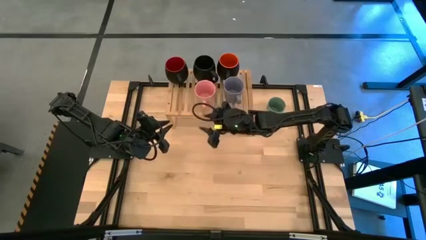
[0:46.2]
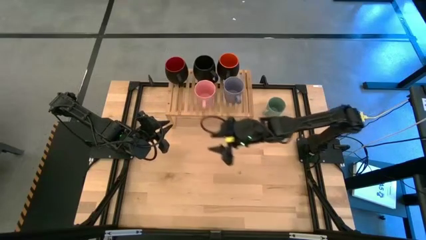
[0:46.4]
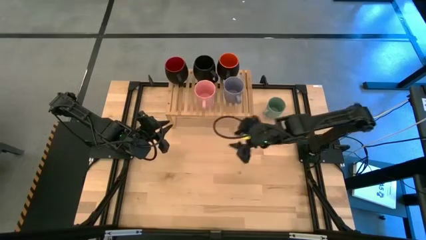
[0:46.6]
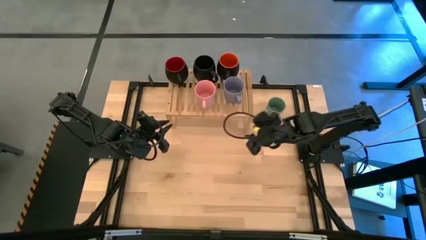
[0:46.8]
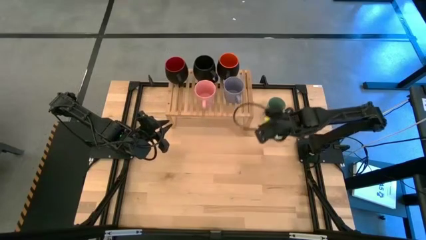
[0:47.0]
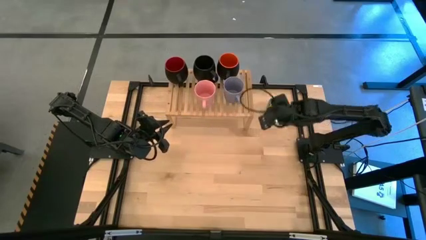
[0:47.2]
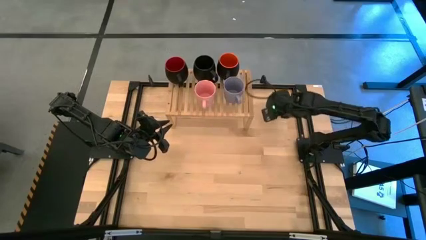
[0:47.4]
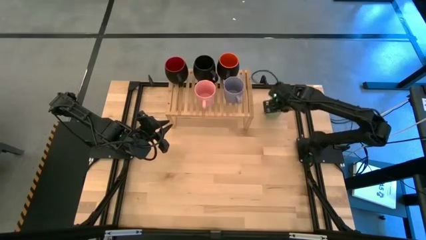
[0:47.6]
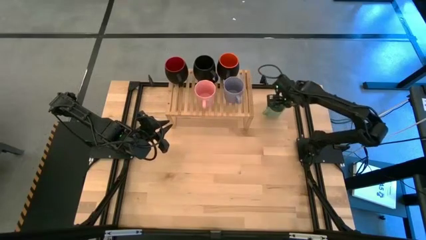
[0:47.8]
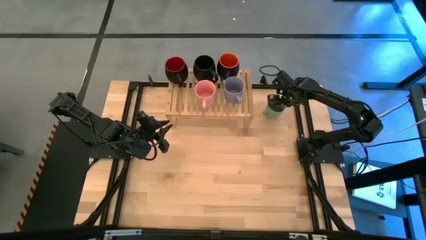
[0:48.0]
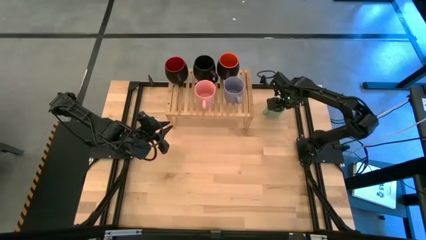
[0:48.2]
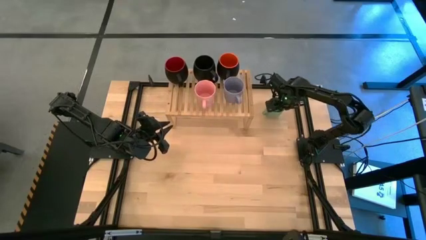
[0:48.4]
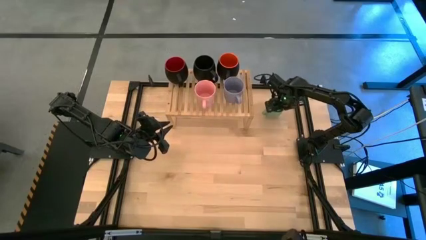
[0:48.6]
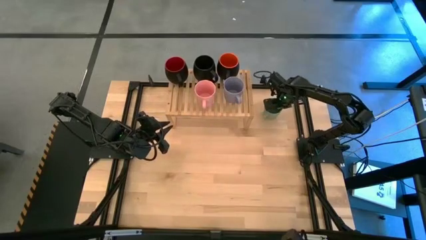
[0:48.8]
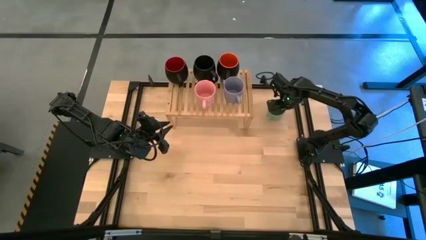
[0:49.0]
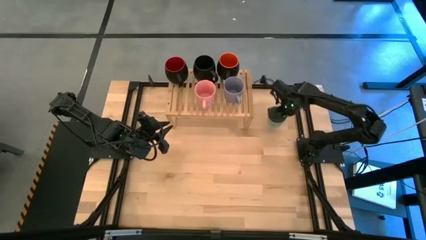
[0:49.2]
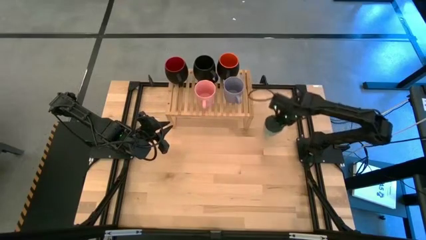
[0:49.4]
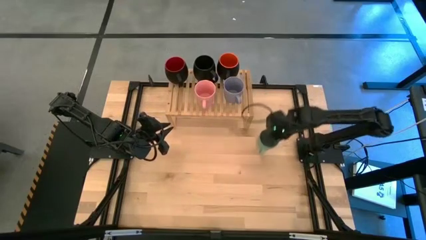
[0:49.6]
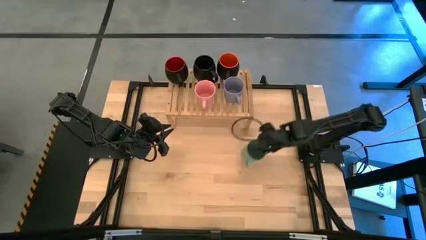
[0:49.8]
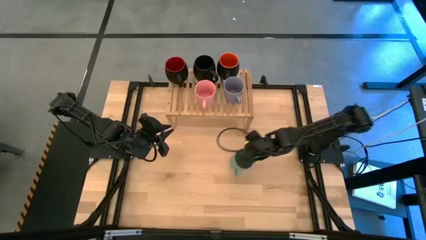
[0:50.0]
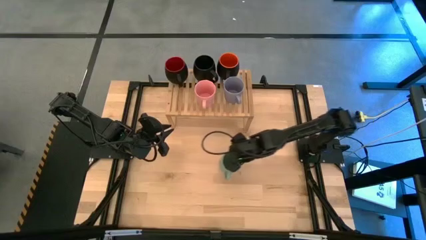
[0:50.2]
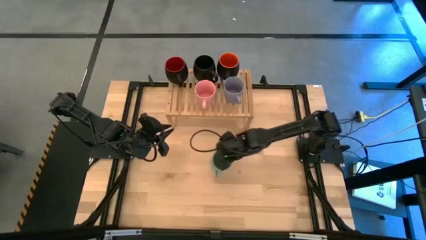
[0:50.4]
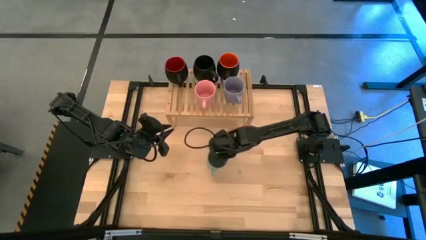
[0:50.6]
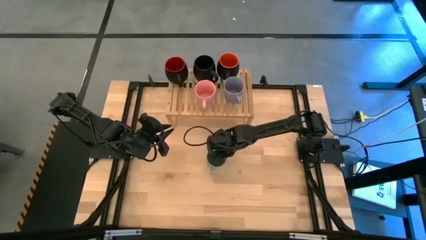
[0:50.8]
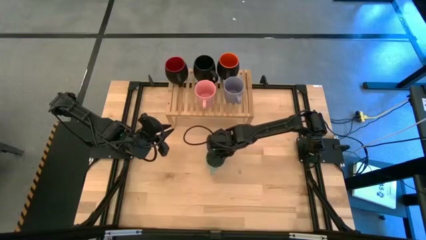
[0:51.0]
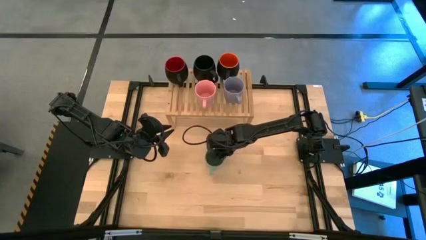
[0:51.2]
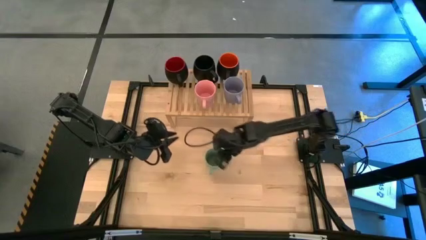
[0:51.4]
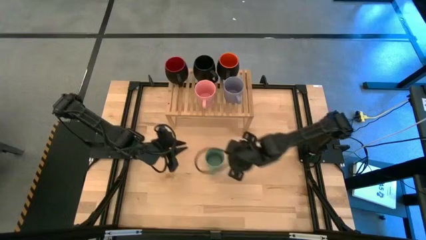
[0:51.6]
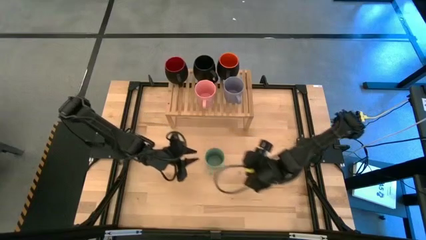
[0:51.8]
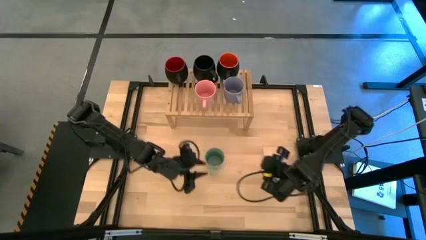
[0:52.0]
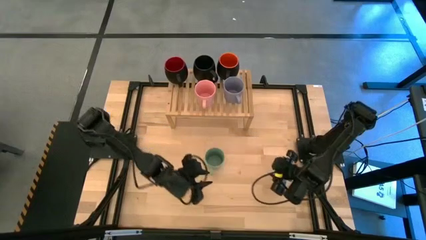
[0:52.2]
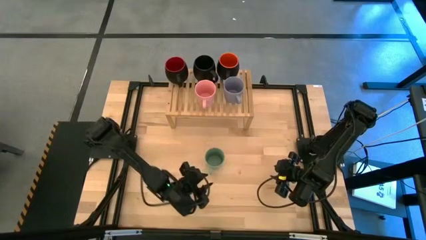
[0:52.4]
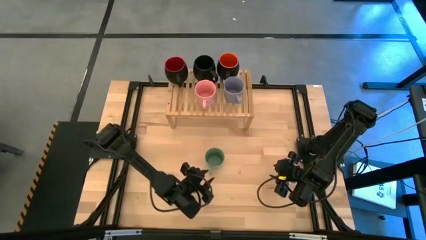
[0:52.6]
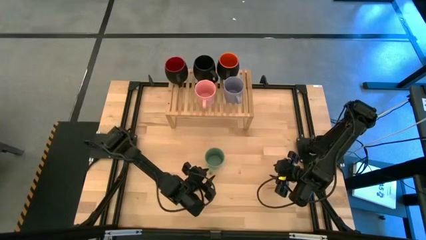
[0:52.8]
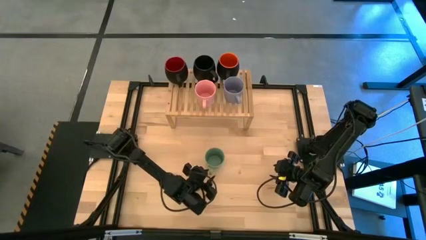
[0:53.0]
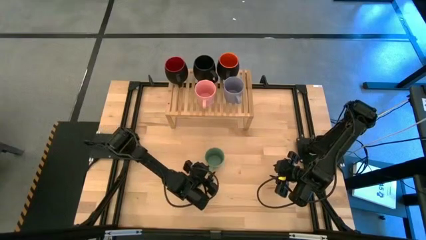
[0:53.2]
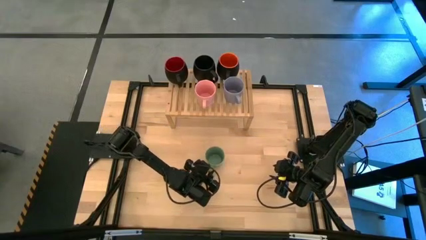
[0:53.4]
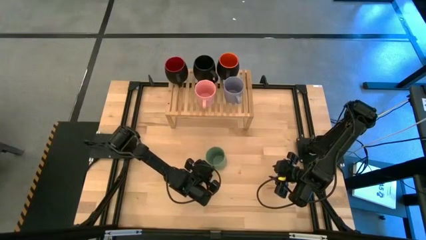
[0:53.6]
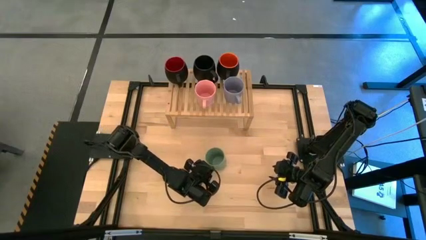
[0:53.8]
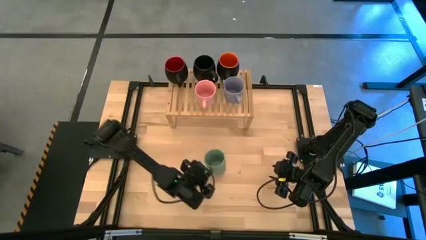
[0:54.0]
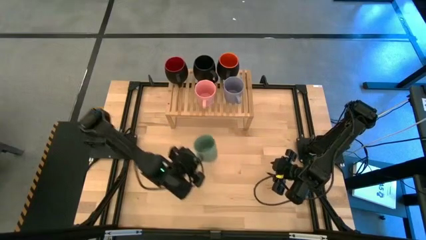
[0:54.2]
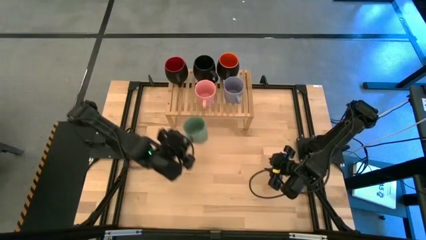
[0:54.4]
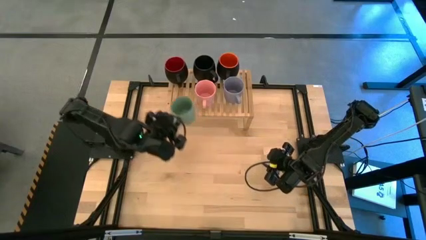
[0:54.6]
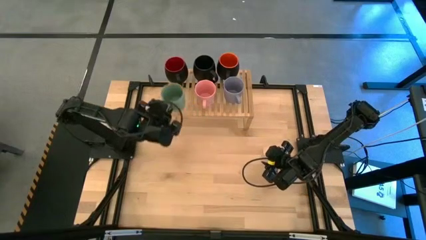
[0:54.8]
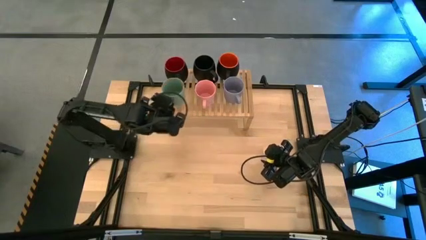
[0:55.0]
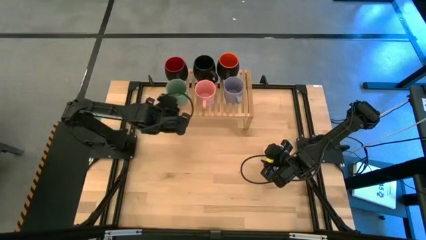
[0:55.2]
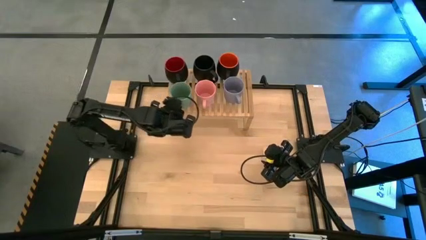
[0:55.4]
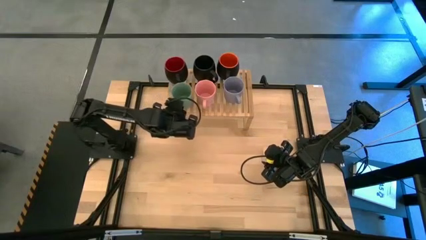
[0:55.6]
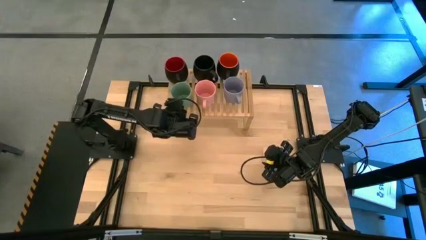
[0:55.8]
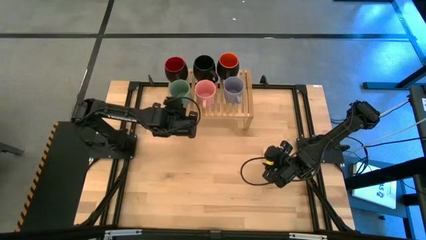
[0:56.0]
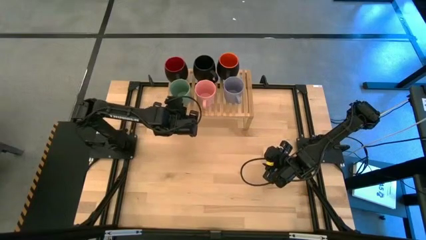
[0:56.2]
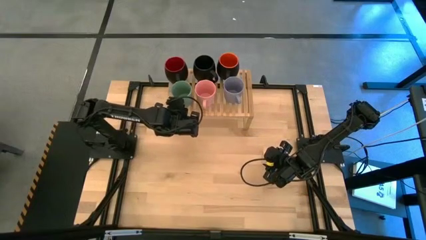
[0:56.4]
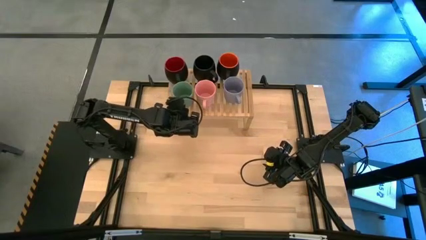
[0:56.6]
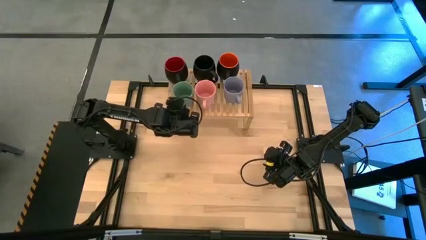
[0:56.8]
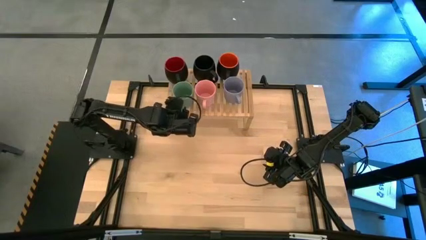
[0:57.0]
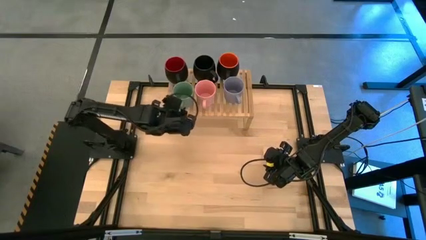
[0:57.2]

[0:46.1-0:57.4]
Task: Place coffee mugs
Put the green mug on the shelf

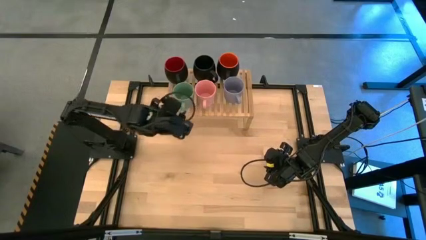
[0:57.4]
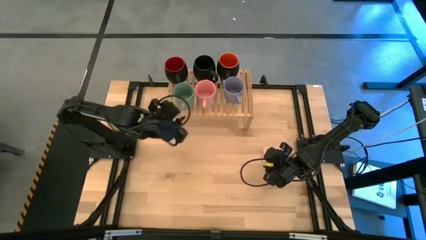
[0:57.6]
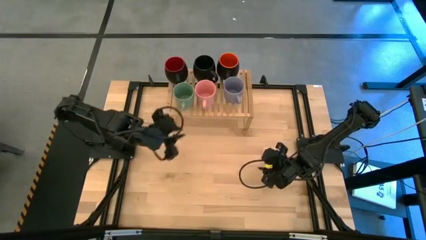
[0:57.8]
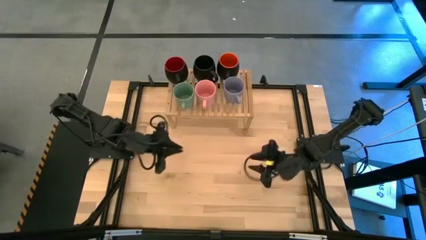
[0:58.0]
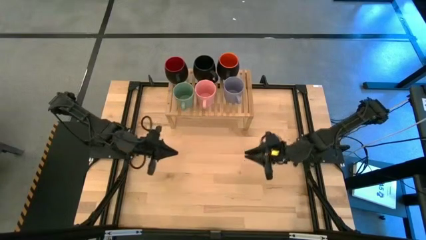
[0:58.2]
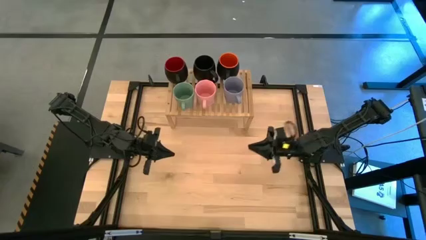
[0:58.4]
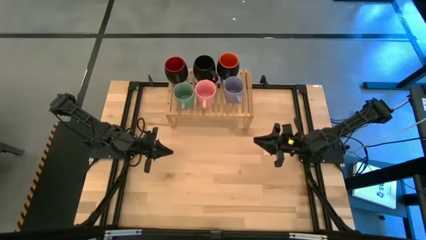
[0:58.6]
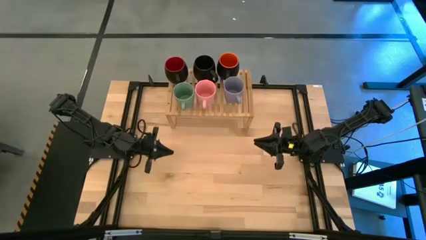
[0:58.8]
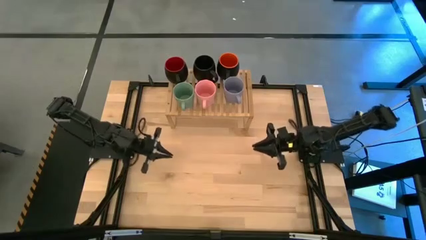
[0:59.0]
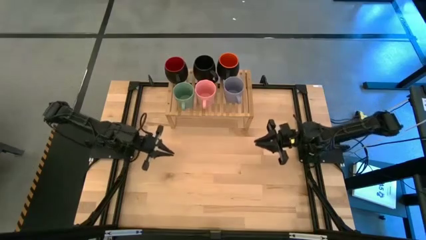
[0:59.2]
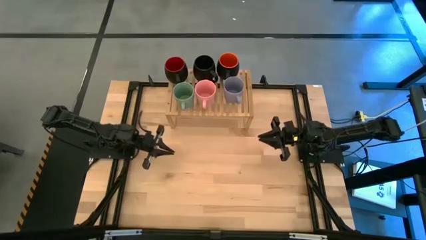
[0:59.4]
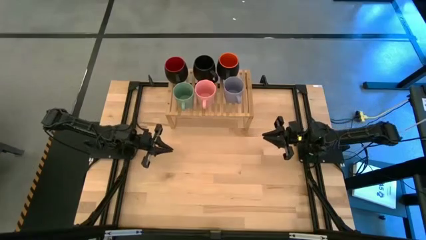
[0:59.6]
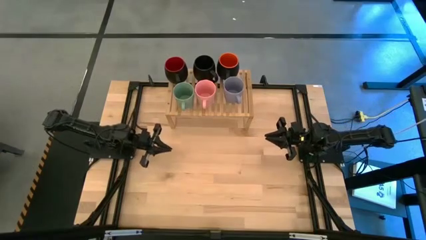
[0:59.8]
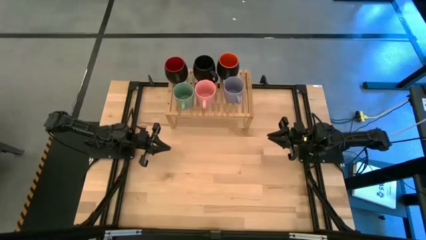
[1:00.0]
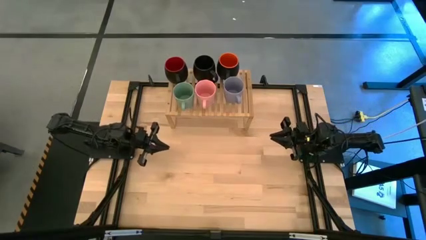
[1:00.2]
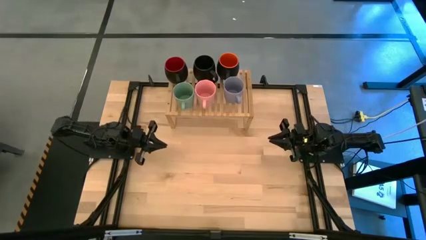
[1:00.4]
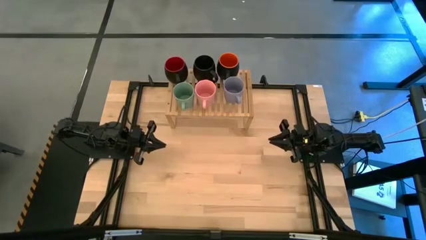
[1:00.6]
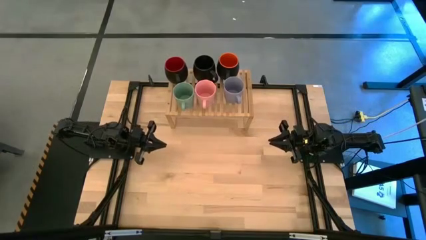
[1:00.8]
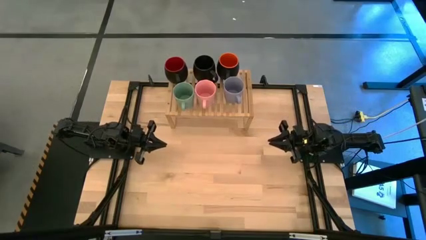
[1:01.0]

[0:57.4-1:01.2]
Return to Home Position

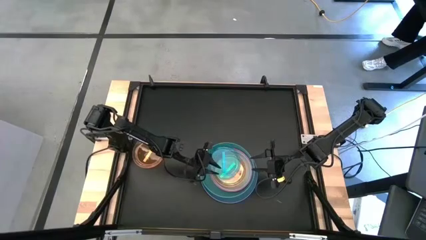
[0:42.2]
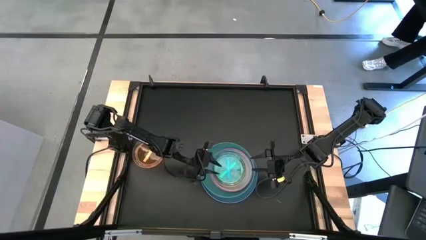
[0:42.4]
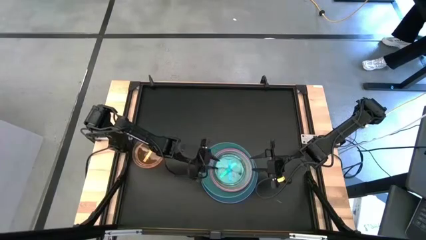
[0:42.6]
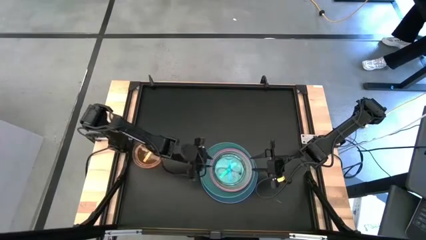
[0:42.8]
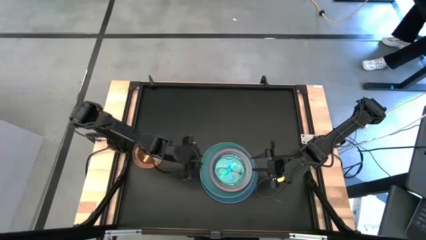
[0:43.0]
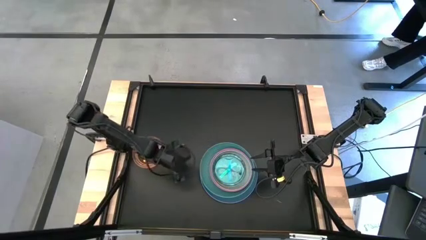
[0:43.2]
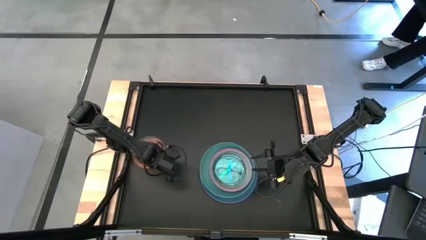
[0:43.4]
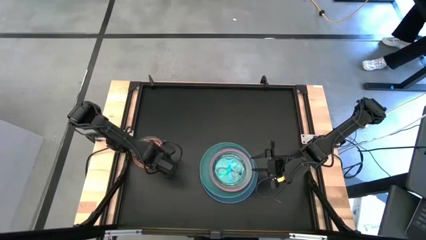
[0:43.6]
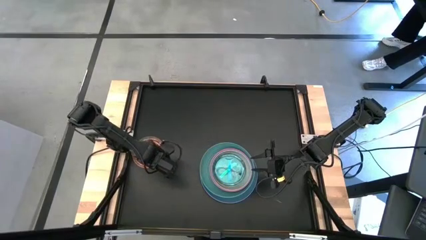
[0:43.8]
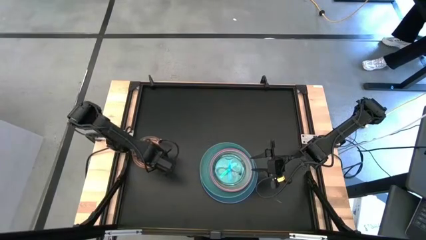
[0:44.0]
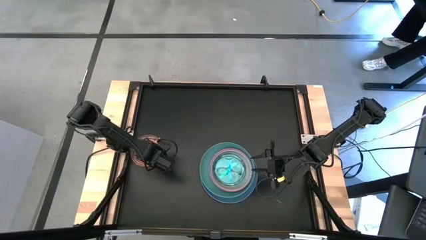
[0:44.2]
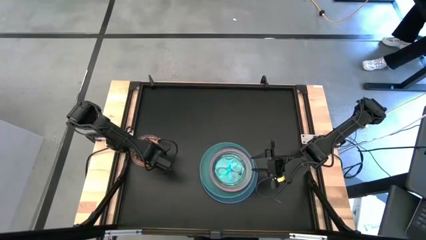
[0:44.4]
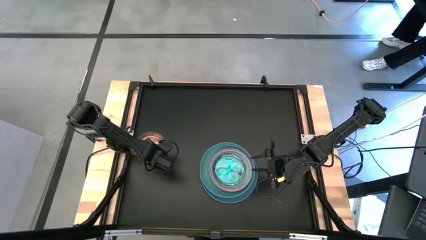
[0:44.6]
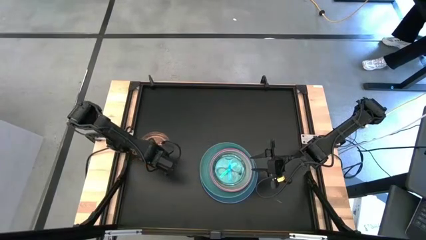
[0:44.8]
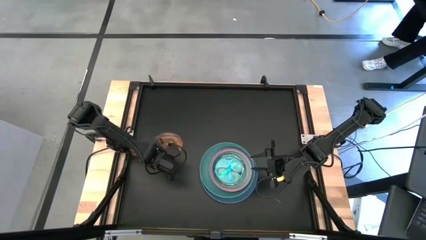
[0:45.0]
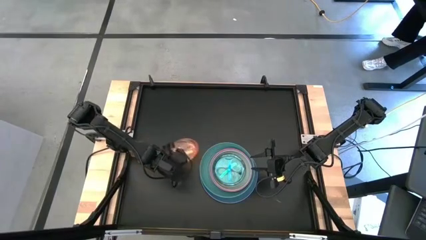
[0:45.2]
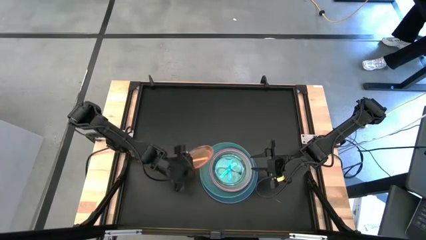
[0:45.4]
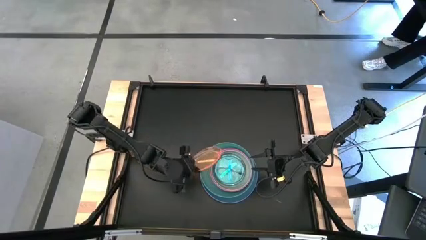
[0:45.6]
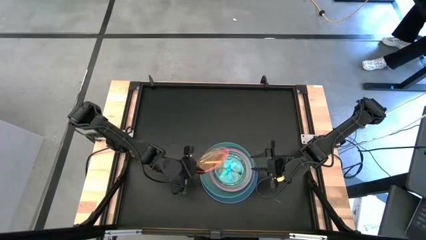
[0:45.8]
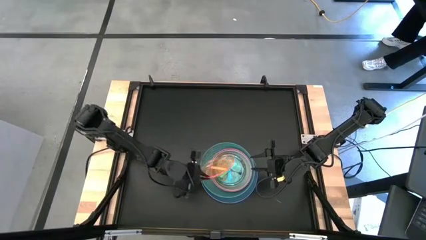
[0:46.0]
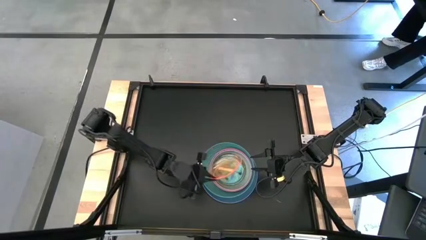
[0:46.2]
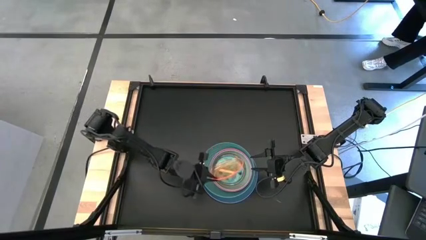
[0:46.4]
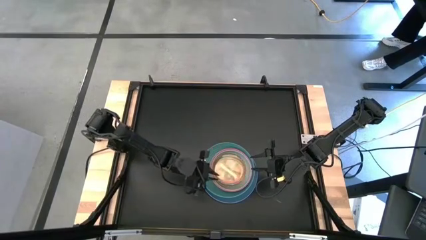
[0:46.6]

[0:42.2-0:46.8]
Task: Stack plastic plates
Stack the orange transparent plate on top of the blue transparent plate
